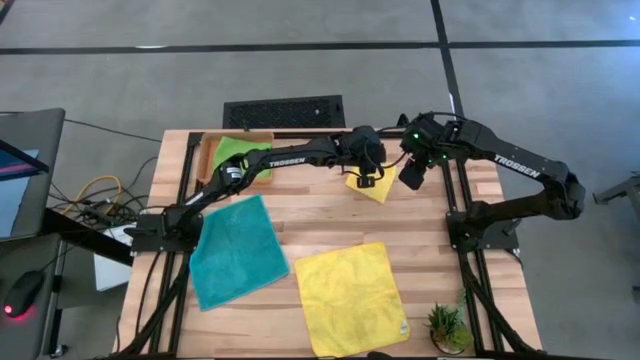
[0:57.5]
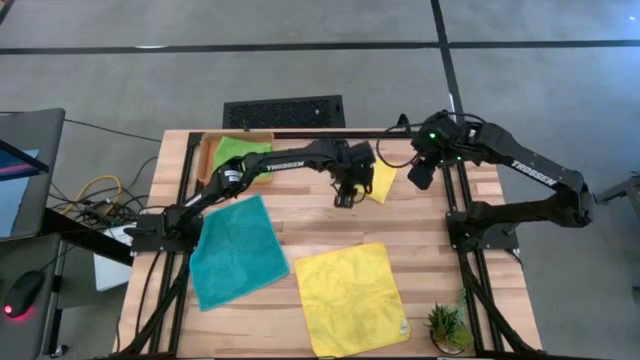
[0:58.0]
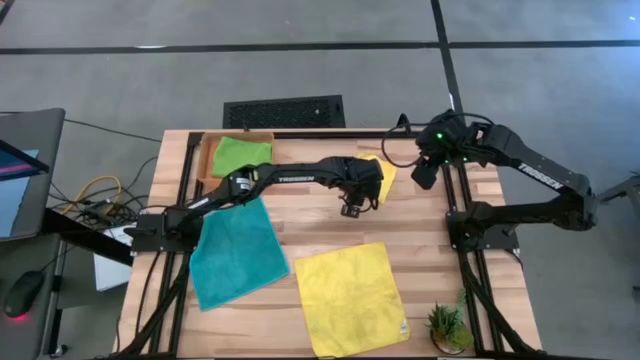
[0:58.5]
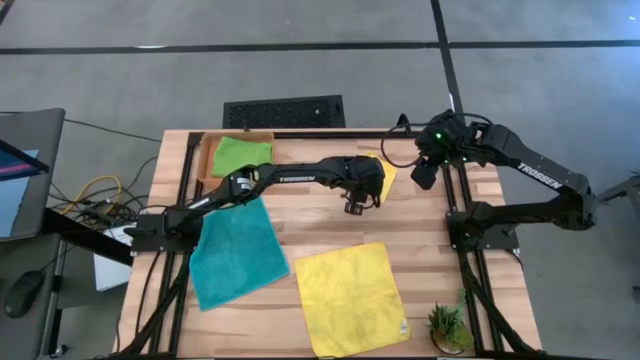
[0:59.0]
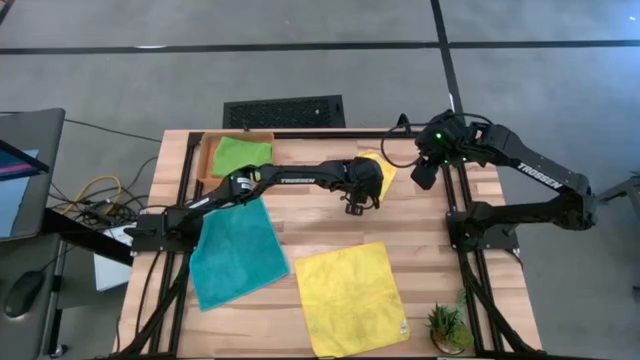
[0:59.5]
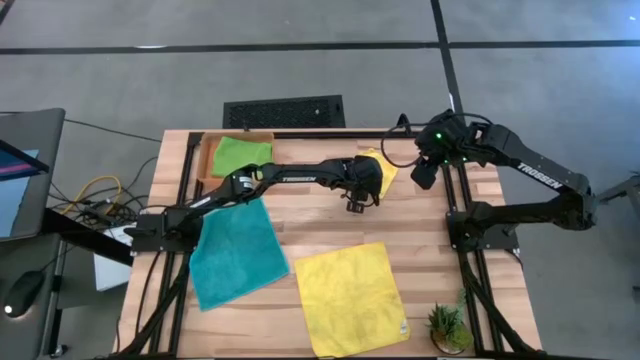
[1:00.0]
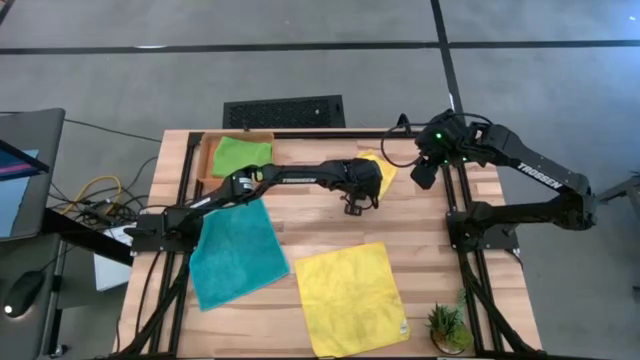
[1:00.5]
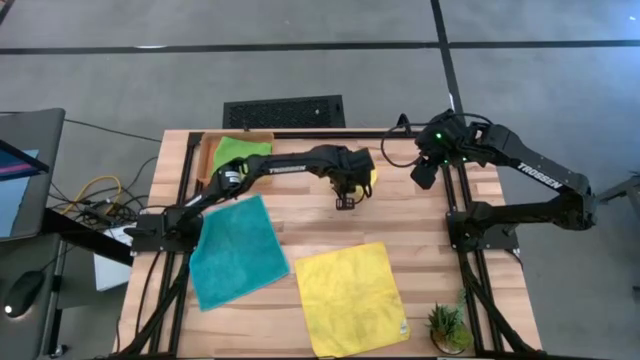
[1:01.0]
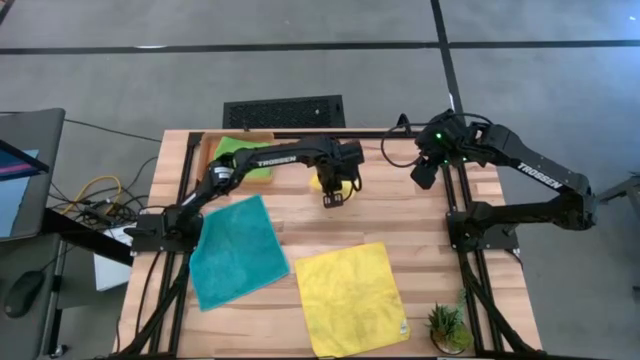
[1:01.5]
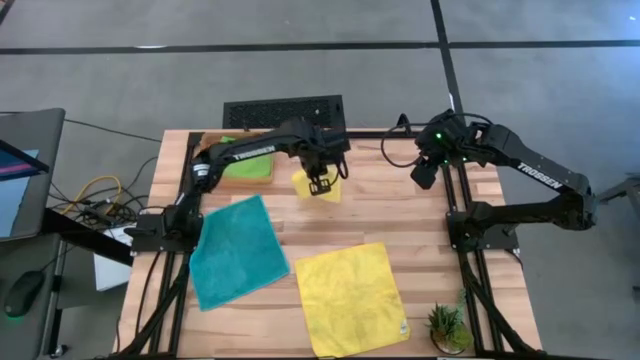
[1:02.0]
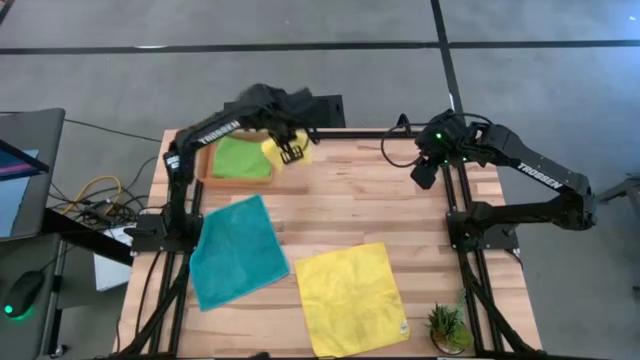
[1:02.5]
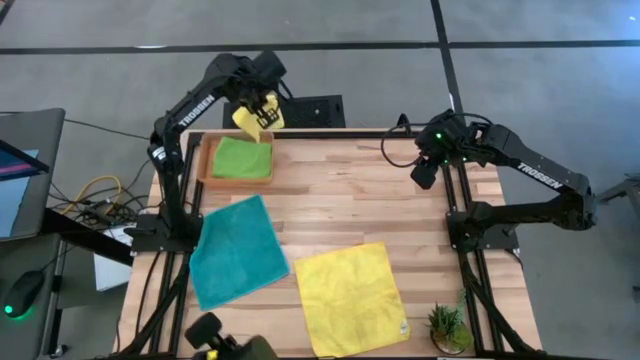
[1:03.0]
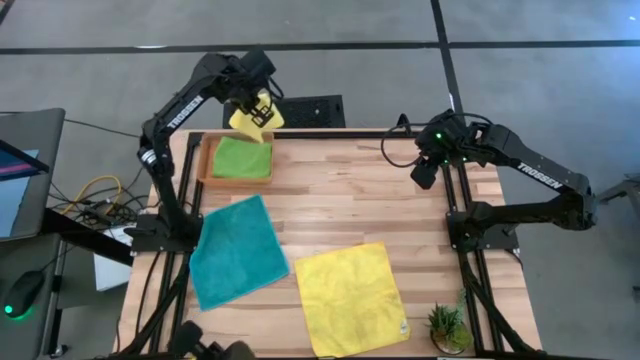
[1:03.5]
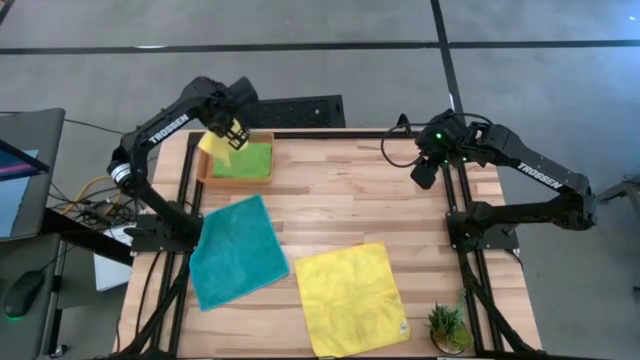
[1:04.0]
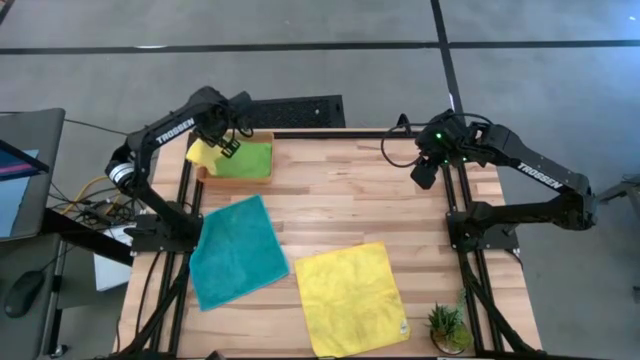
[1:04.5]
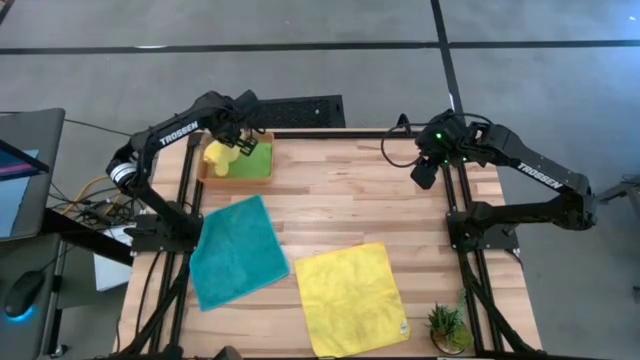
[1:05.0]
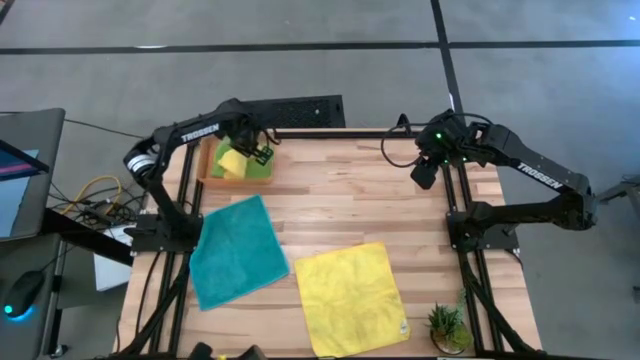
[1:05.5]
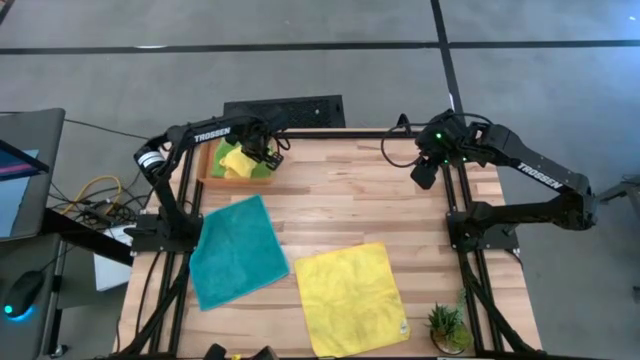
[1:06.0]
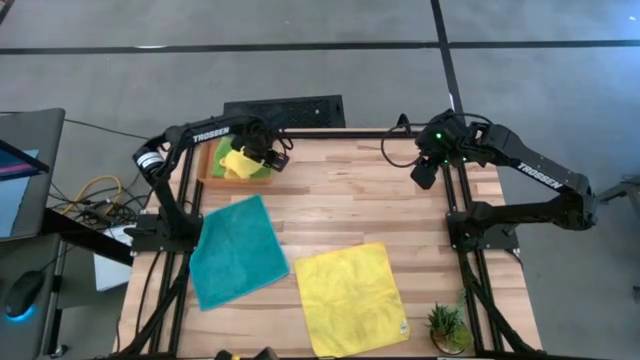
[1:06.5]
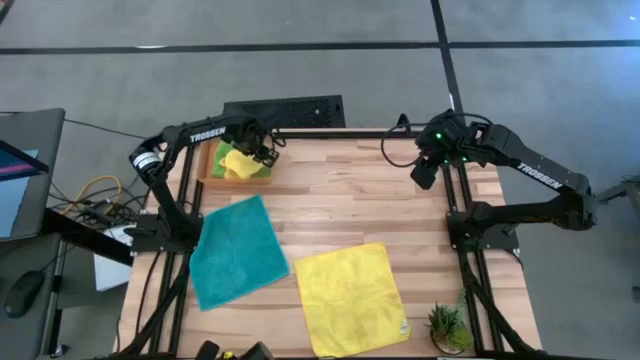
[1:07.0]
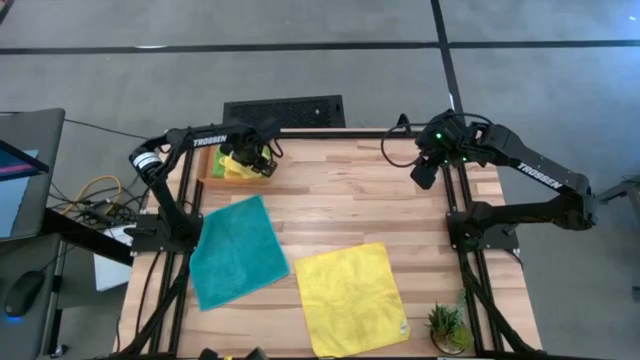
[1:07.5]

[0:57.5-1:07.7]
Task: Fold microfiber towels
Stack the top yellow microfiber towel on top of the green microfiber towel

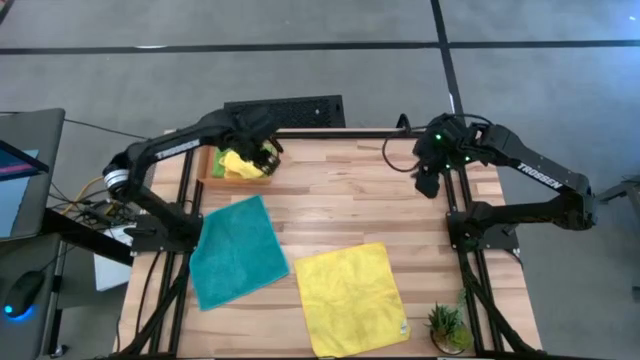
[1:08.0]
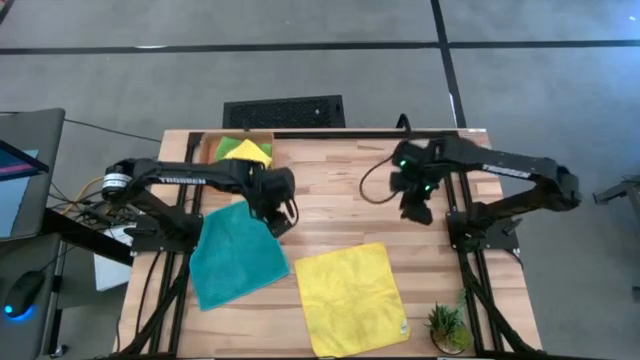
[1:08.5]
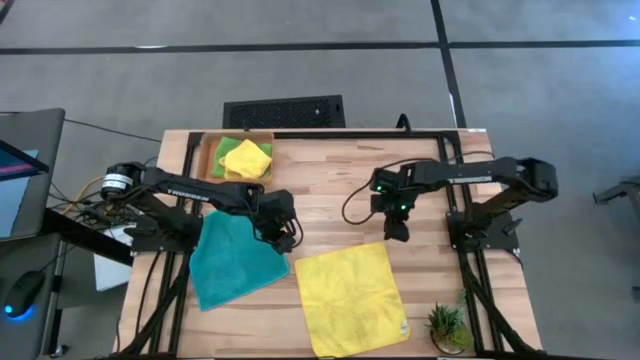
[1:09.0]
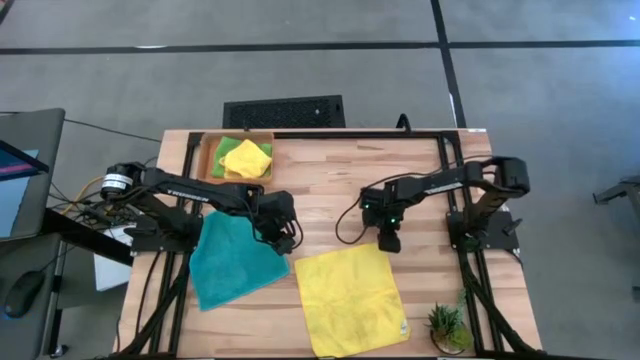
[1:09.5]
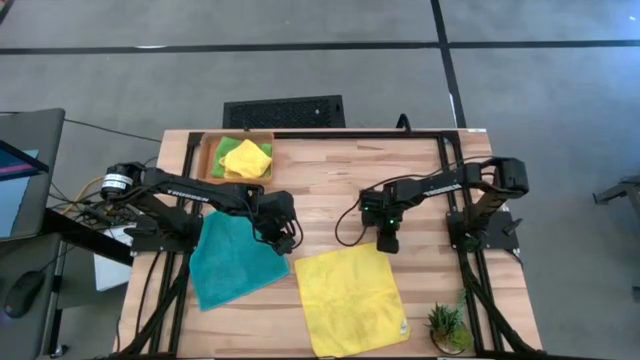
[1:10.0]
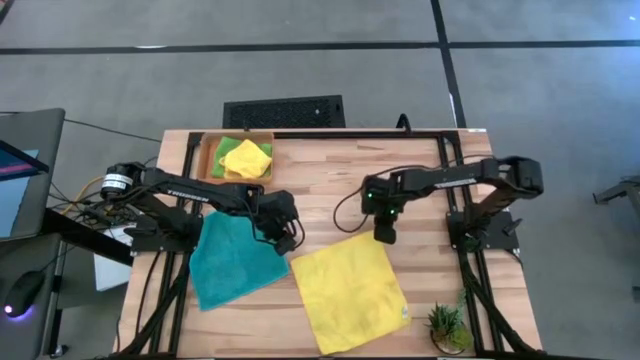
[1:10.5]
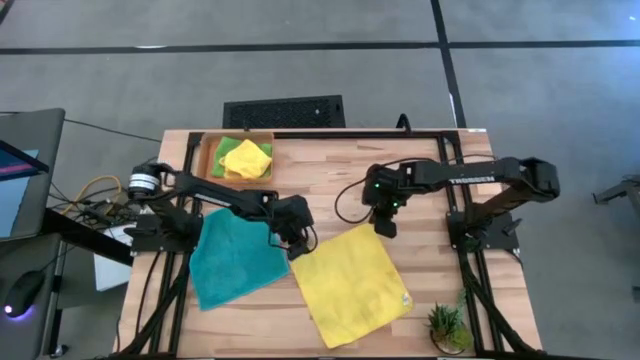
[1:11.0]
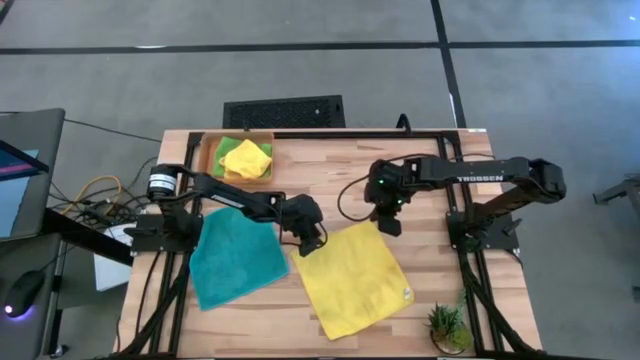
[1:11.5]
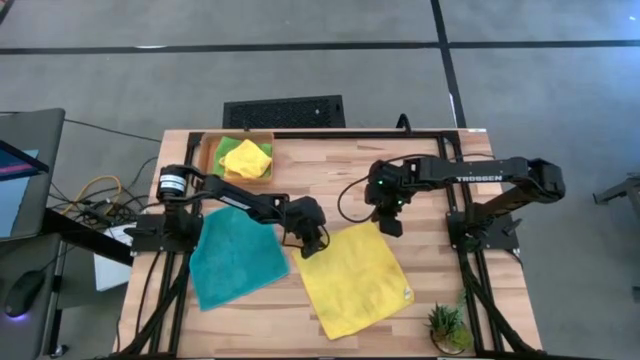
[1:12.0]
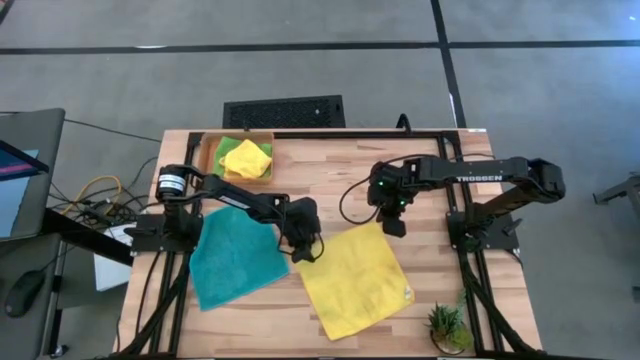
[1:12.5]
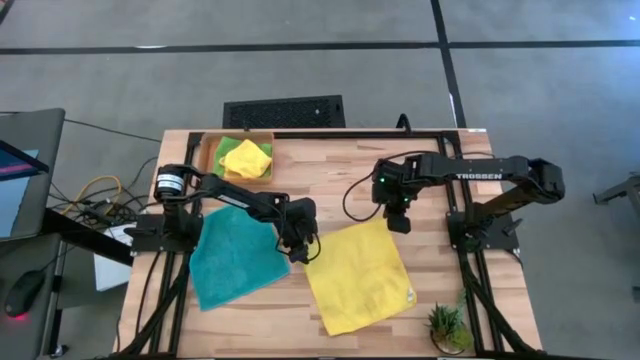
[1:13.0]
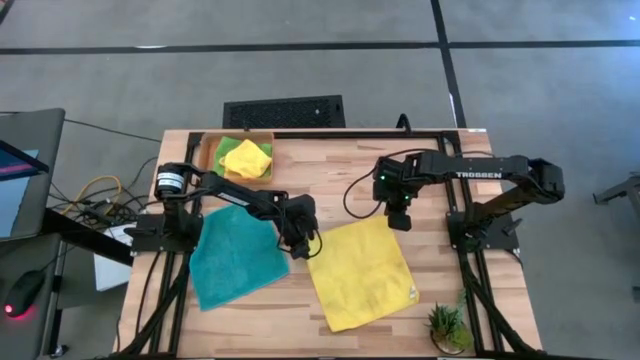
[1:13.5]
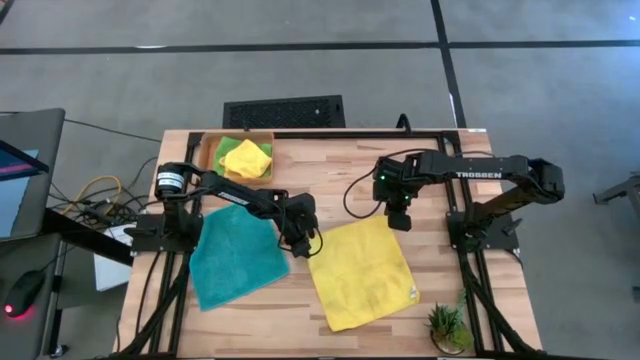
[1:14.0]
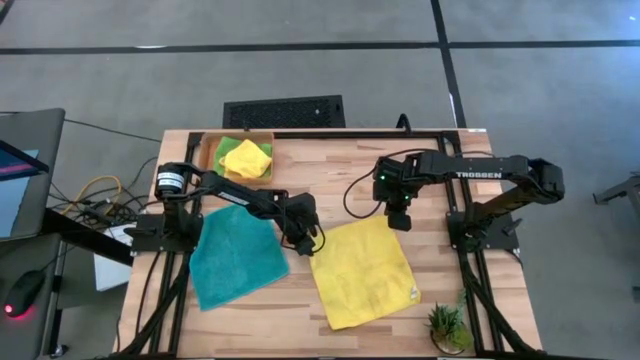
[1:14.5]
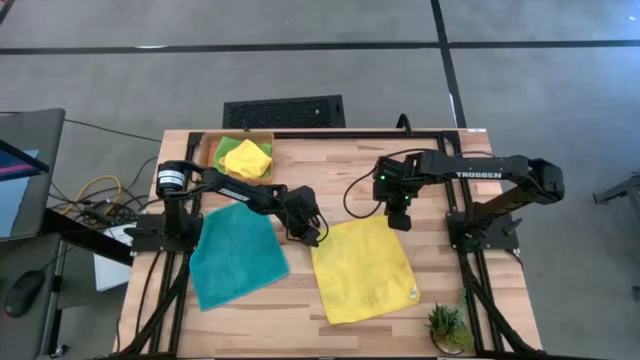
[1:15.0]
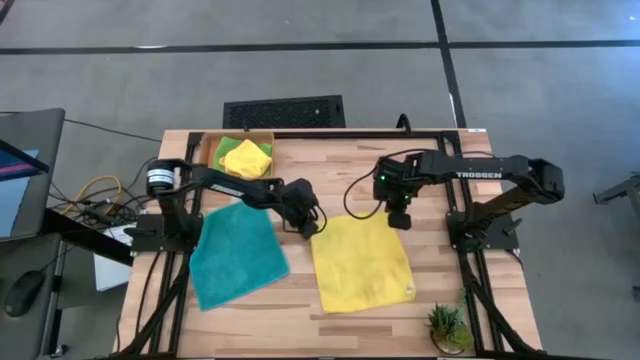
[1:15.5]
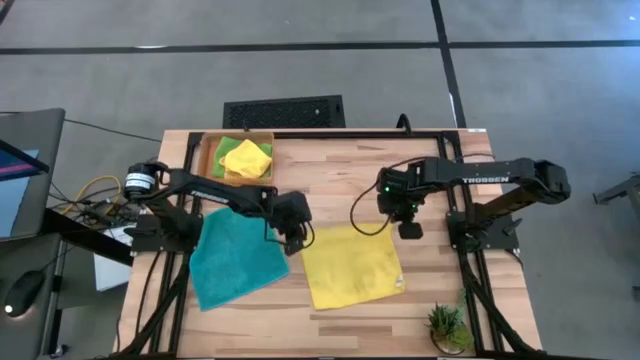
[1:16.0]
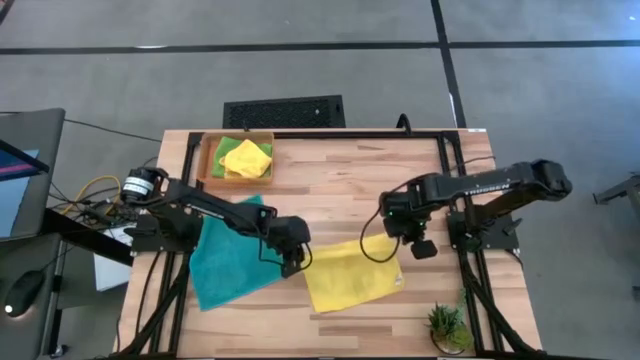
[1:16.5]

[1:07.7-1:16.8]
Fold the yellow microfiber towel

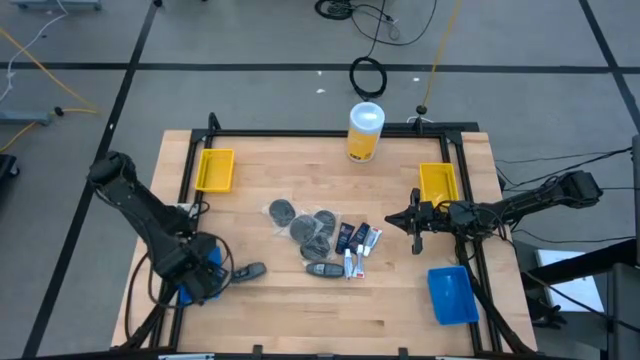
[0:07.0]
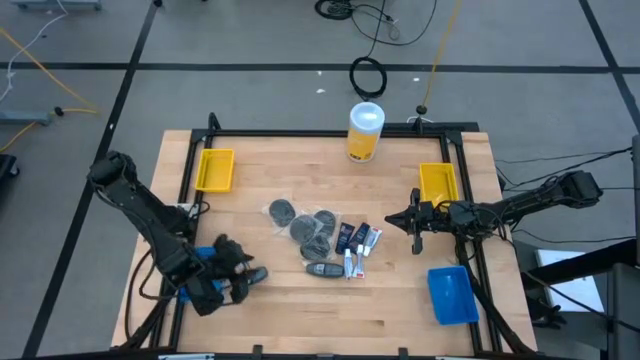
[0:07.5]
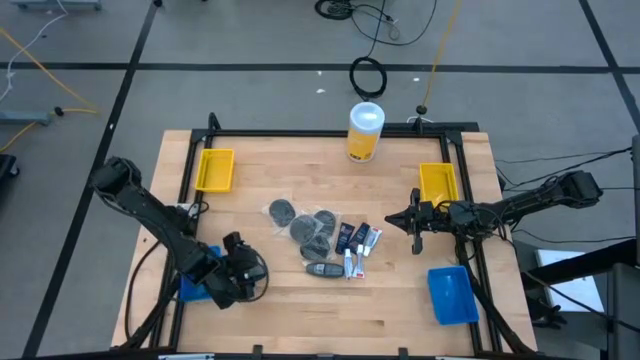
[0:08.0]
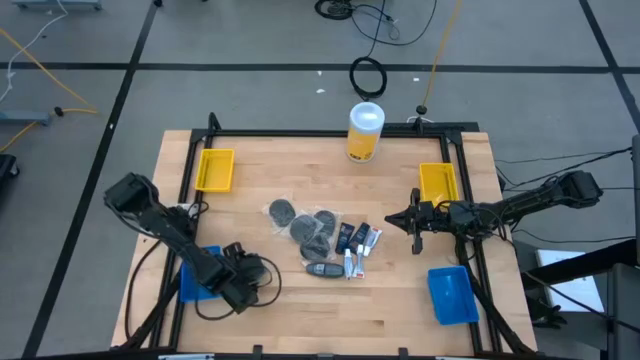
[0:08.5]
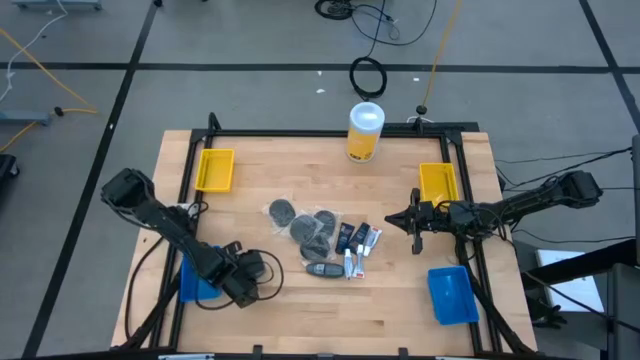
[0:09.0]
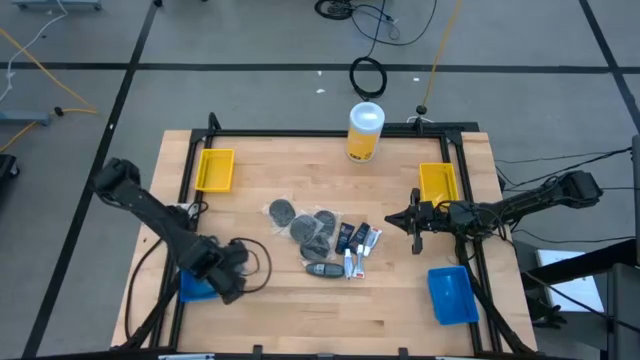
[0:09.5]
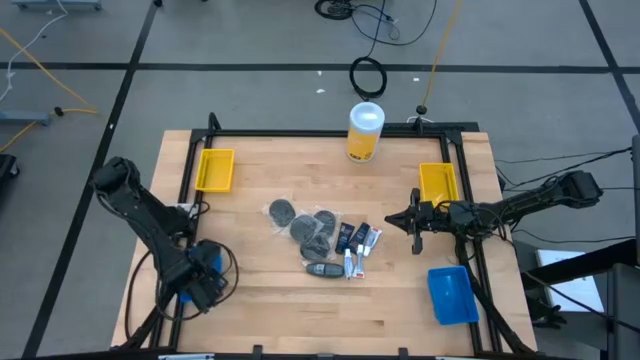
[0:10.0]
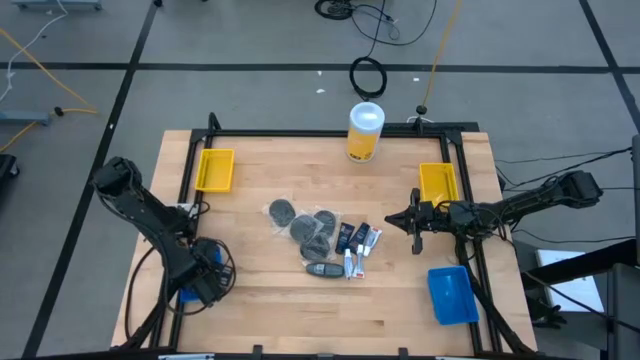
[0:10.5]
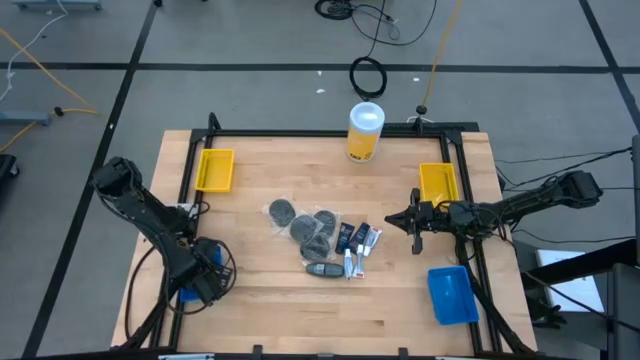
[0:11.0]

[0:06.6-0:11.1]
Task: Pick & Place Travel size toiletries
Put the gray deodorant into the left blue bin
